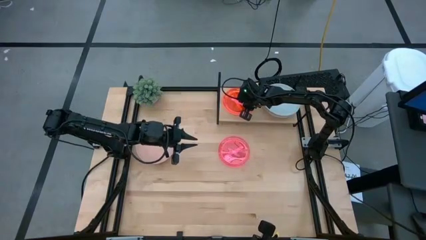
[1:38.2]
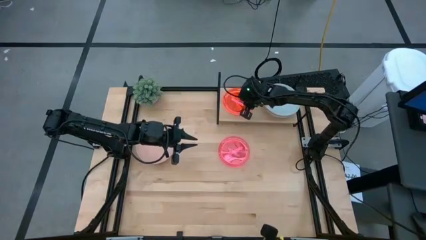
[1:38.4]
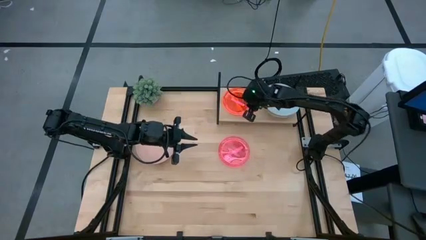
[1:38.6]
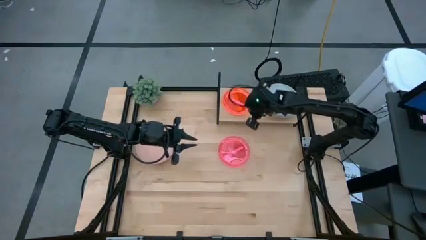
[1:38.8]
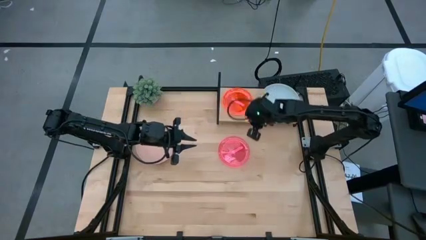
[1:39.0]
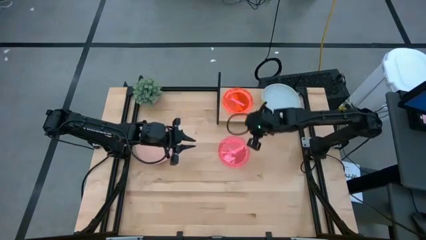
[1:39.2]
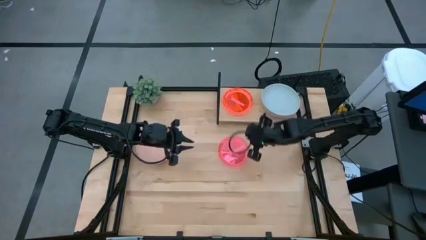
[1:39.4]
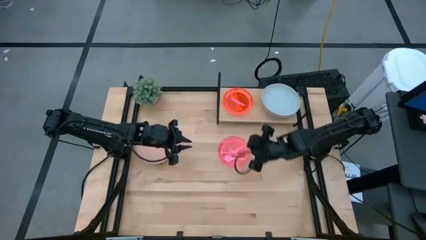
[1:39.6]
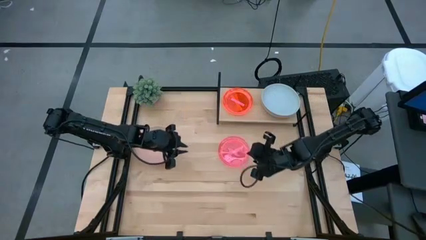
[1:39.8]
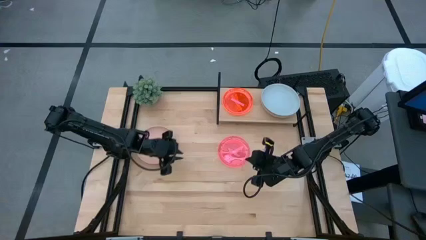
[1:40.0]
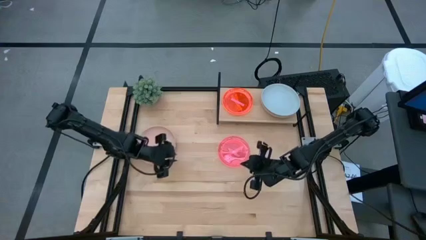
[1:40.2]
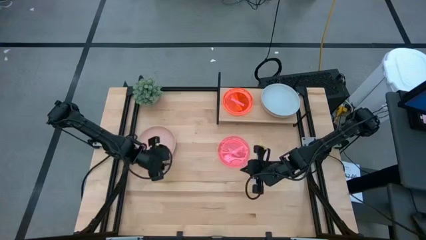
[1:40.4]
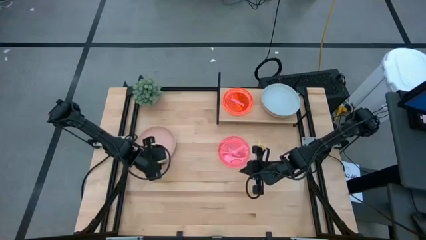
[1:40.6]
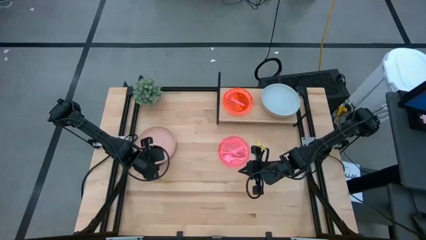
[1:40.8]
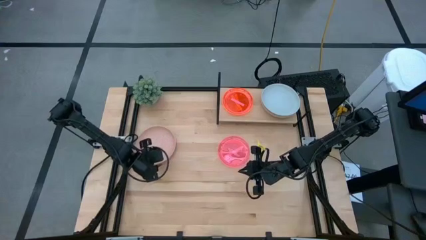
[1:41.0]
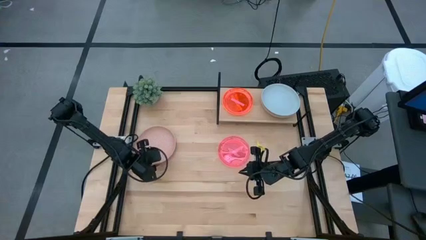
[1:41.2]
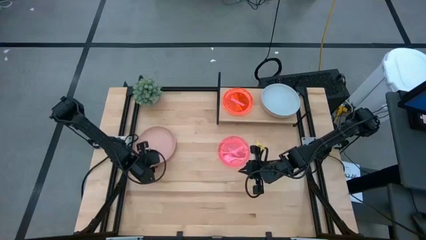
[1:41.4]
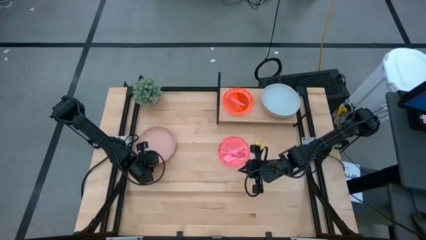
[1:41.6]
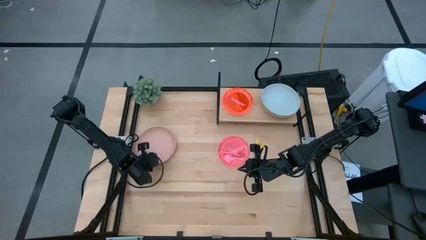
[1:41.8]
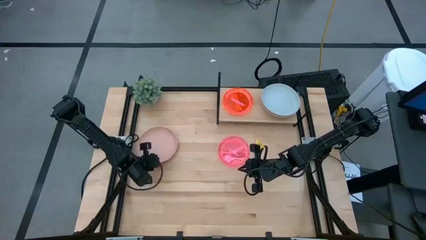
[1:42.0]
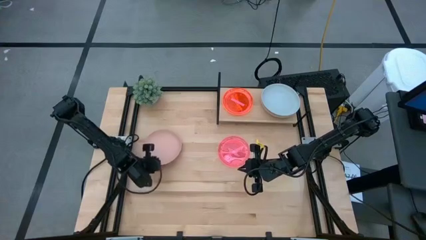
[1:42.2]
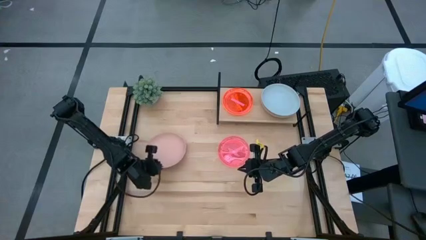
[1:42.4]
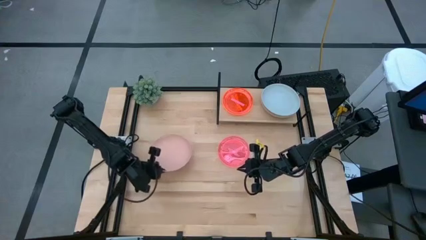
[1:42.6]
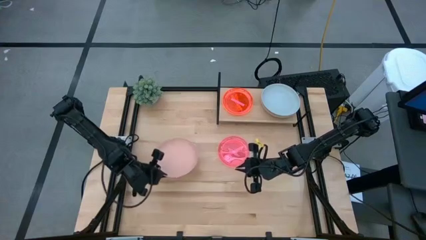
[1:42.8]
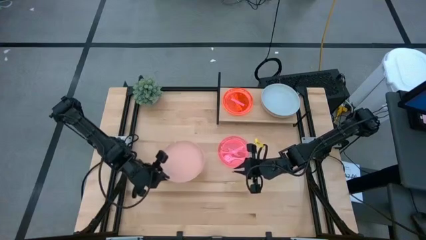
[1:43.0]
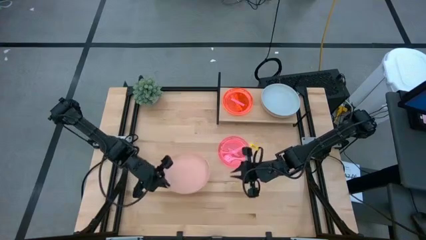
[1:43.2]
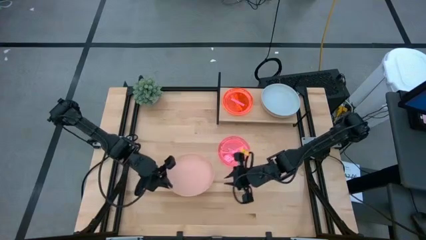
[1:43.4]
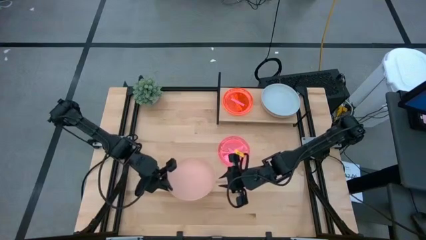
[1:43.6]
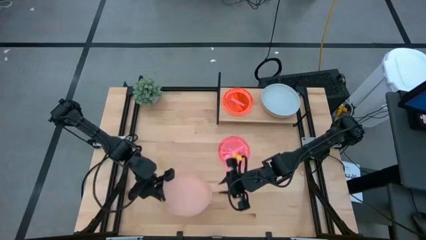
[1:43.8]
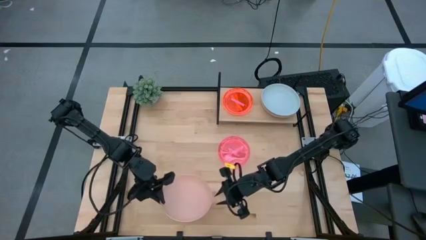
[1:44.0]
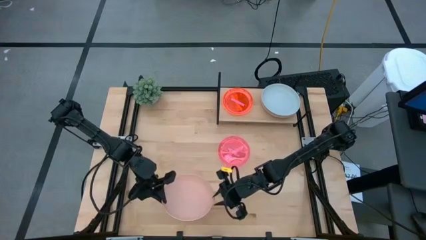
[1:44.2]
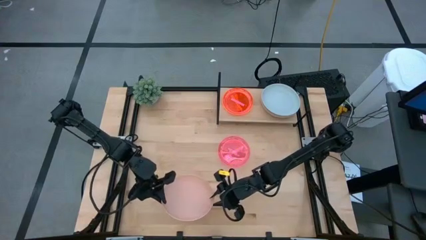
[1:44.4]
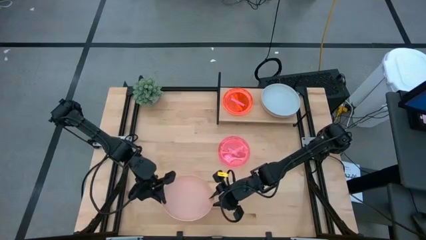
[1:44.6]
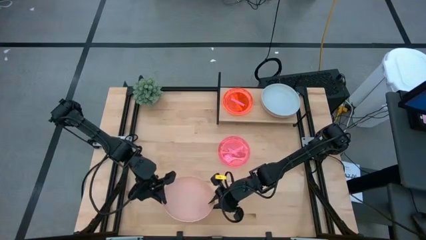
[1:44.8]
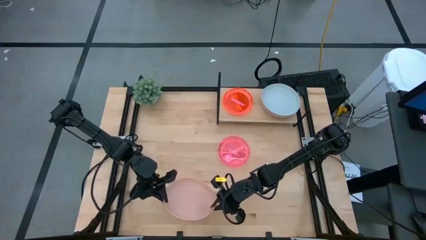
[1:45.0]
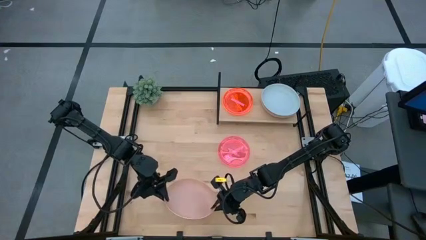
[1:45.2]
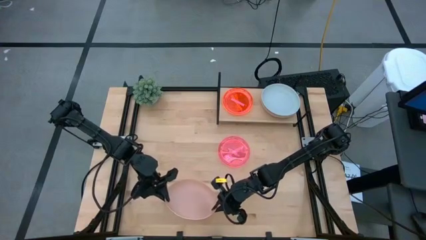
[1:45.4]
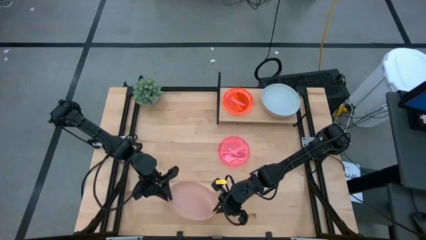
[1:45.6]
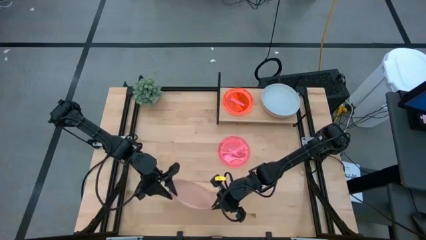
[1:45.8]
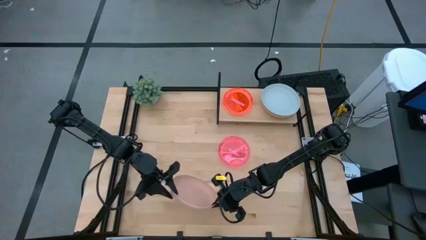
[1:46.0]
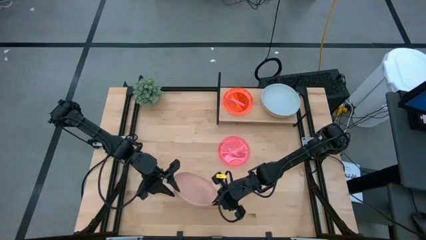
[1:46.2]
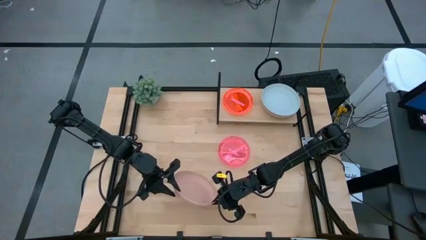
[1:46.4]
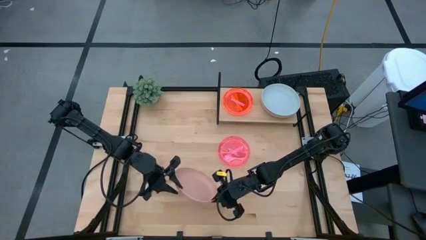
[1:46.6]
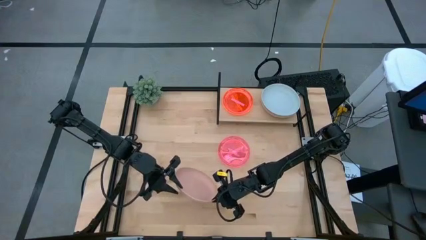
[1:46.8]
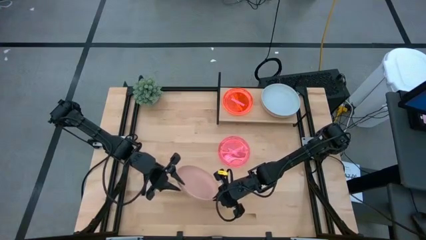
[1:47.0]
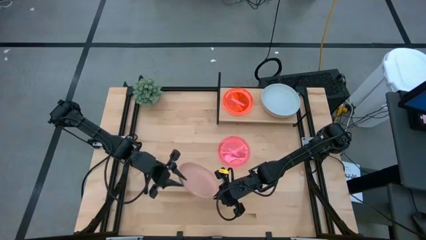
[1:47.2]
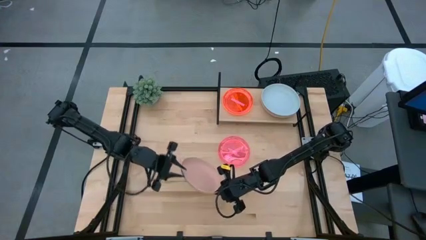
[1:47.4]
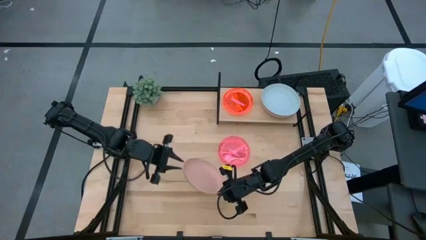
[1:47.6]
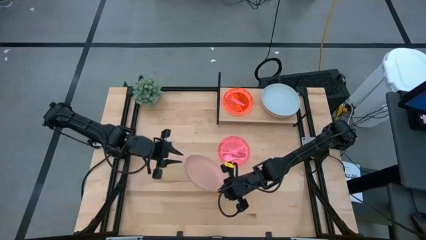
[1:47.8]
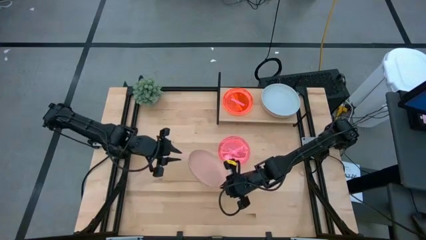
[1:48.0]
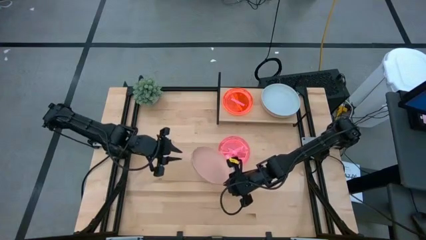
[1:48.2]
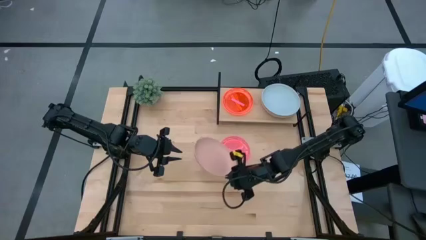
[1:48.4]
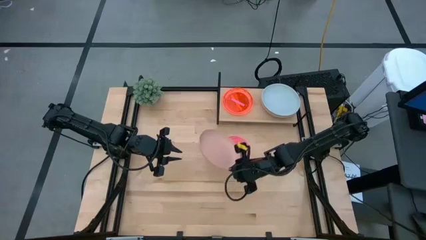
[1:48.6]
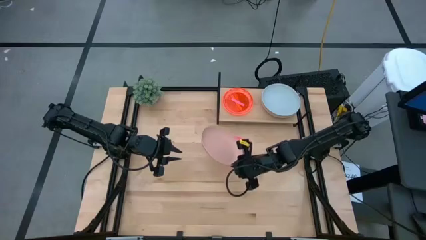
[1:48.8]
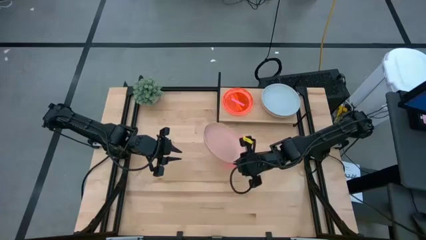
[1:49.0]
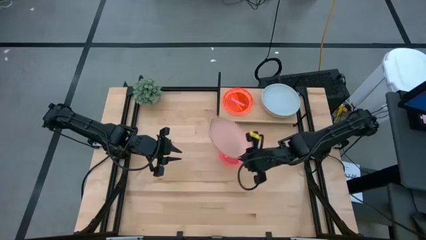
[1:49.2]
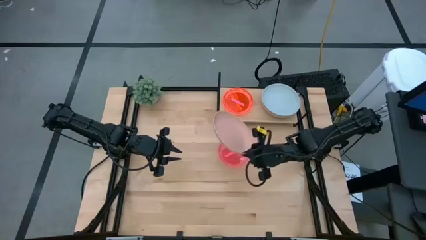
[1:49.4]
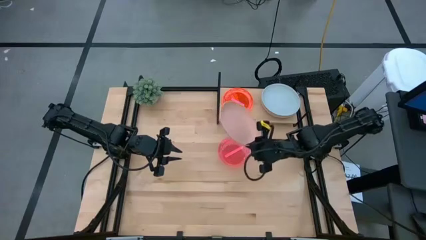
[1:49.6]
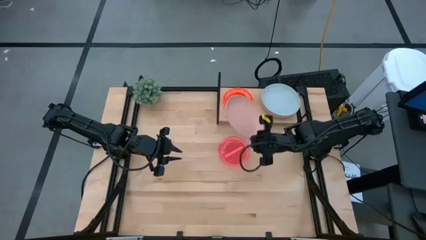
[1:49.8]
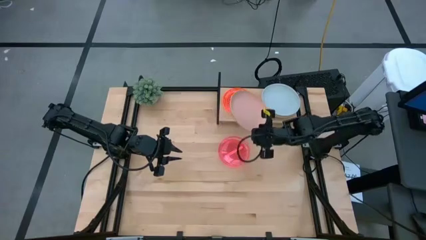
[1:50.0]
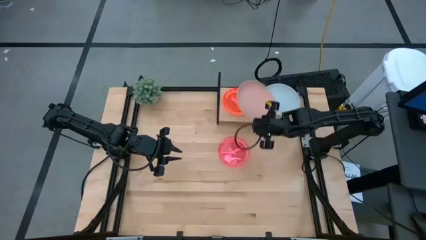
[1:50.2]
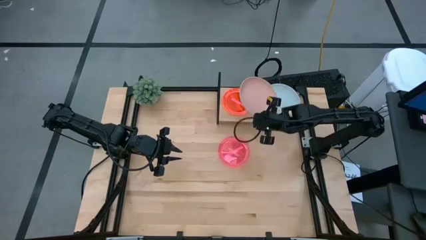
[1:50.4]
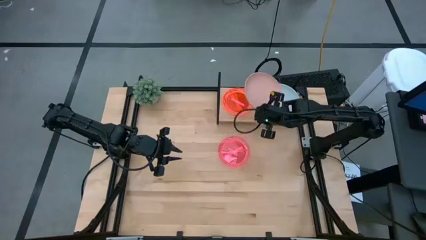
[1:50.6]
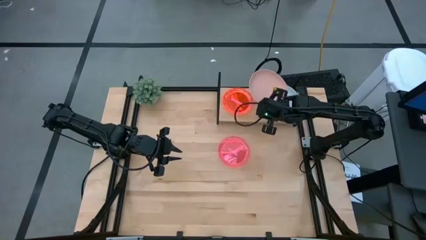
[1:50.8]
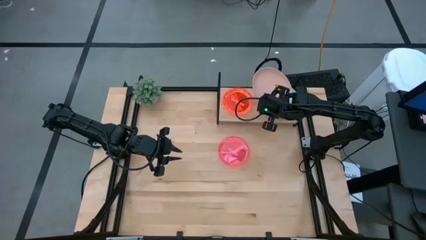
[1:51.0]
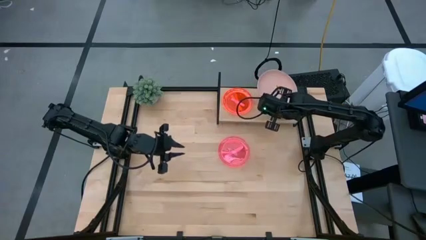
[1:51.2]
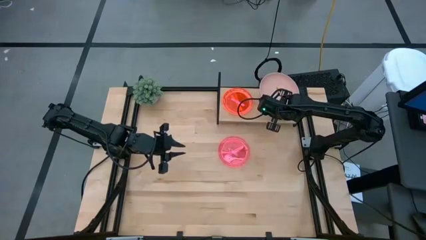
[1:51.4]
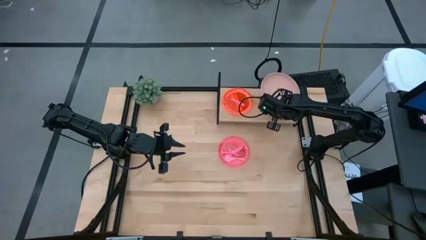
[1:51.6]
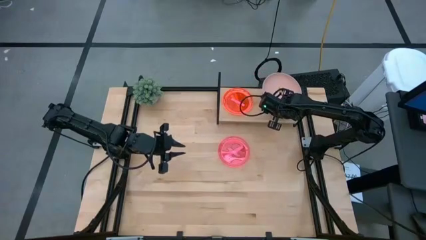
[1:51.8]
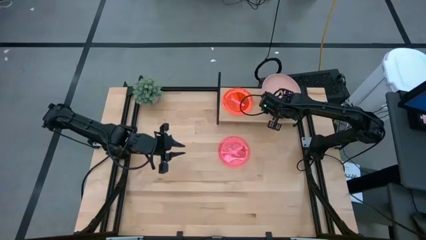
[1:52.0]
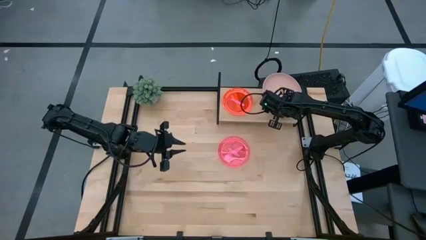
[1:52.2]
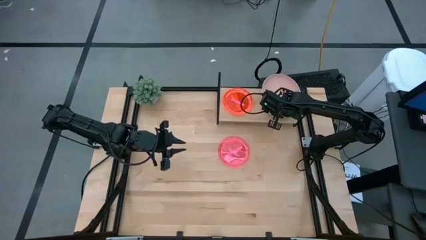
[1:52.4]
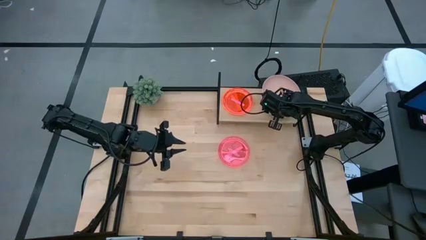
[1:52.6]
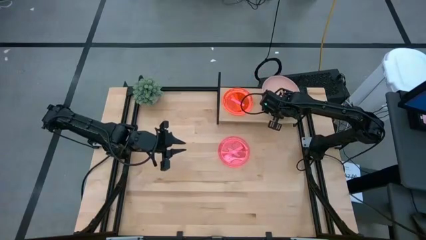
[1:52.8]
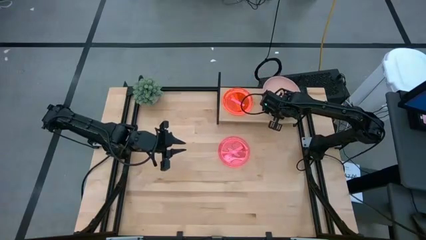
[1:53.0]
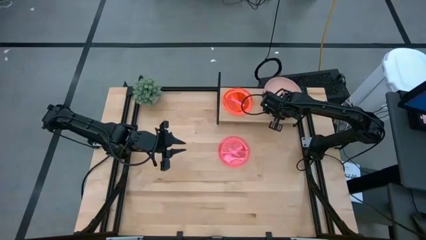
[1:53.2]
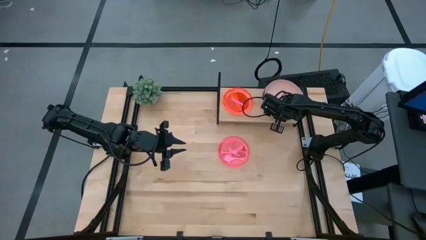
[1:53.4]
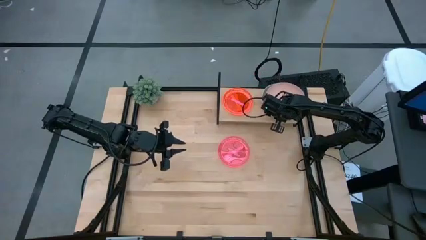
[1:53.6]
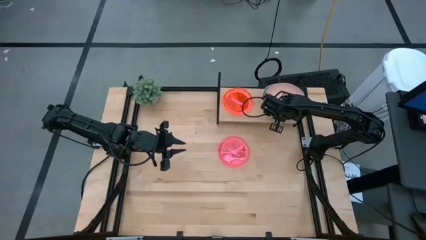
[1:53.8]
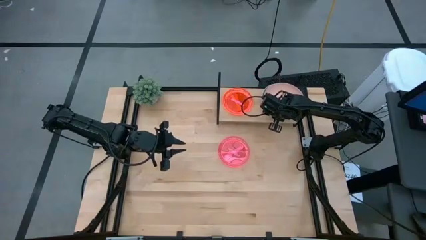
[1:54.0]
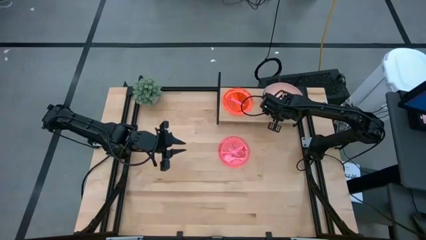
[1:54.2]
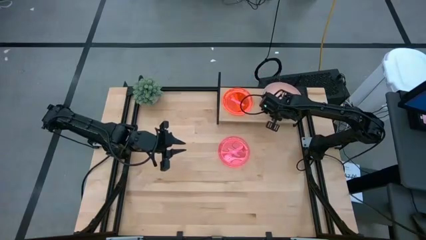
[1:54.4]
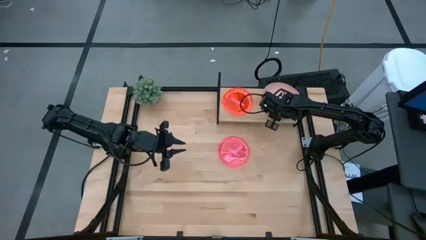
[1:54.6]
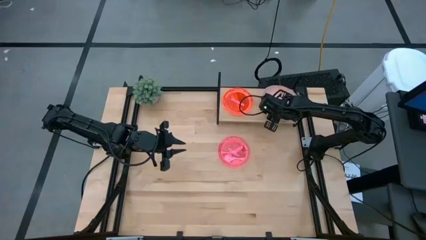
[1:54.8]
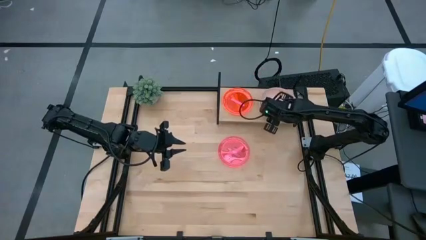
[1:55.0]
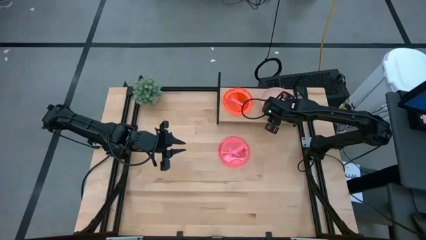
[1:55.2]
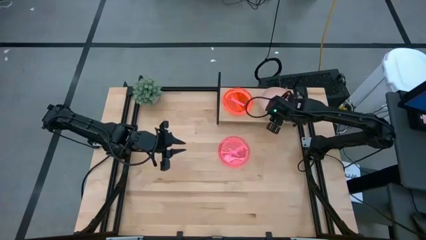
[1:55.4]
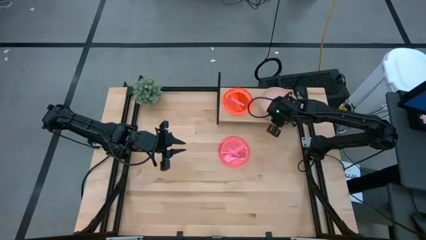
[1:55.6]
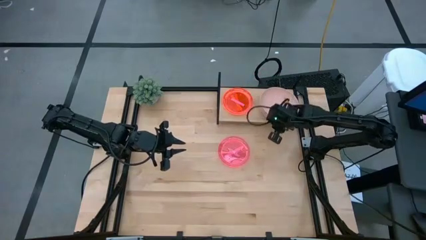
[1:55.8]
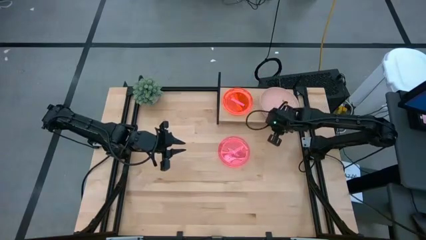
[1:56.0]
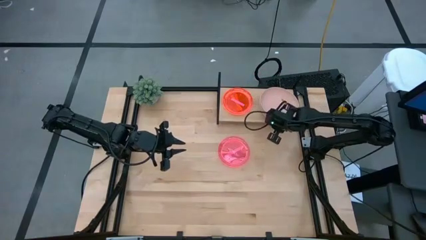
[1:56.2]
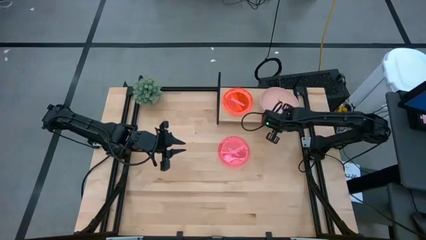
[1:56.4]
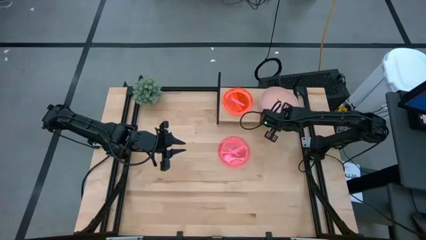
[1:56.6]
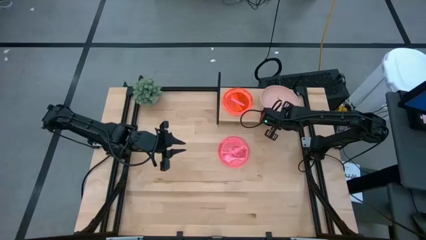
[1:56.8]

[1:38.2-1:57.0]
Task: Place and stack plates onto a shelf
Stack the light pink plate on top of the blue plate on the shelf
